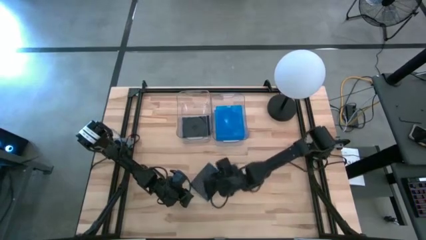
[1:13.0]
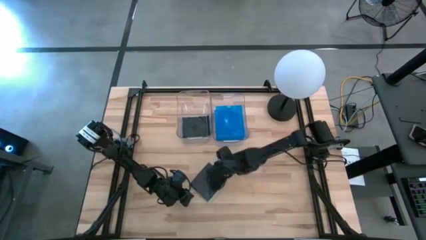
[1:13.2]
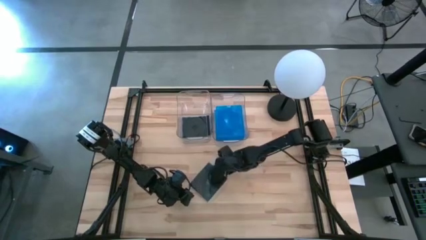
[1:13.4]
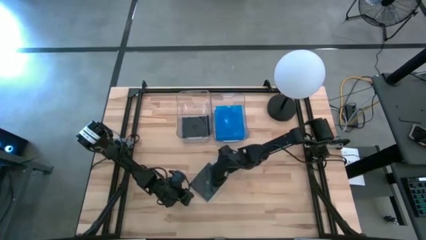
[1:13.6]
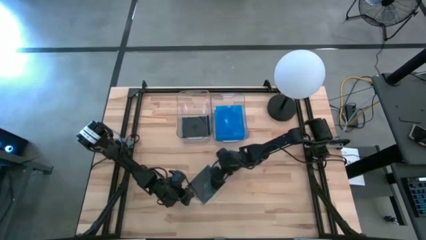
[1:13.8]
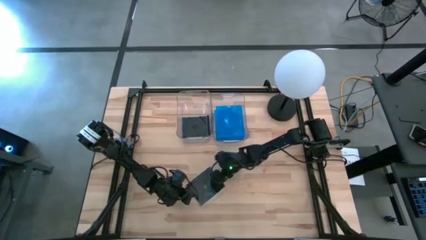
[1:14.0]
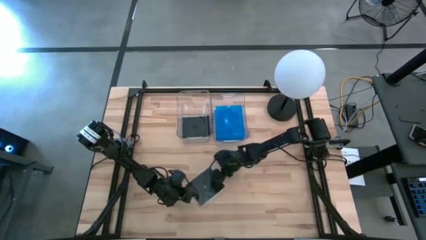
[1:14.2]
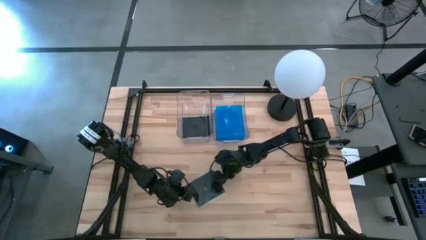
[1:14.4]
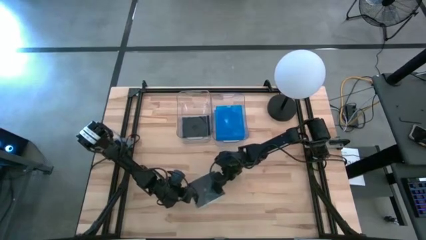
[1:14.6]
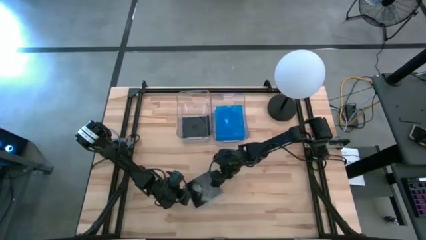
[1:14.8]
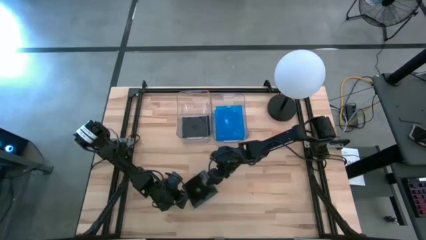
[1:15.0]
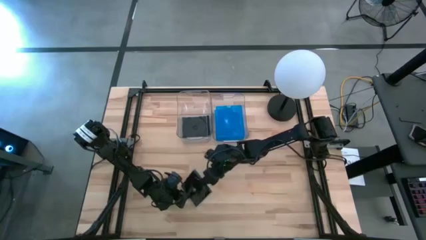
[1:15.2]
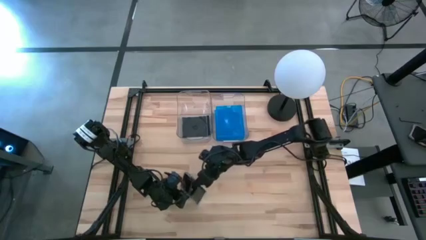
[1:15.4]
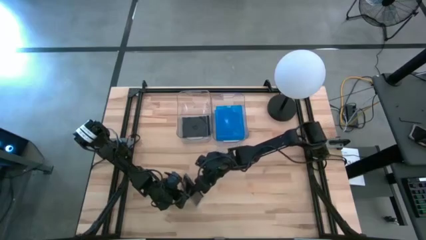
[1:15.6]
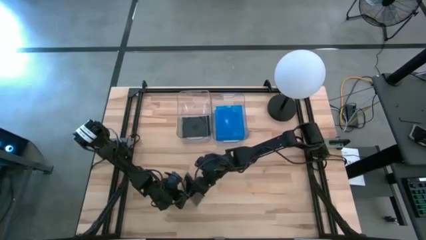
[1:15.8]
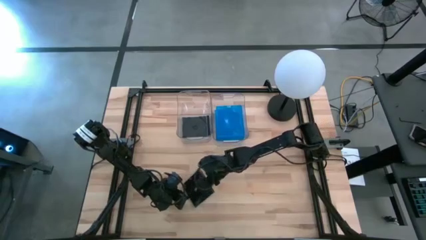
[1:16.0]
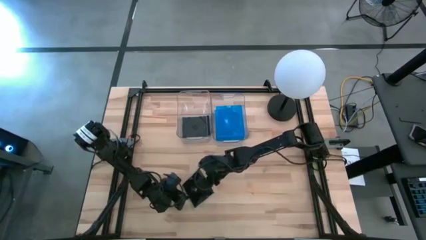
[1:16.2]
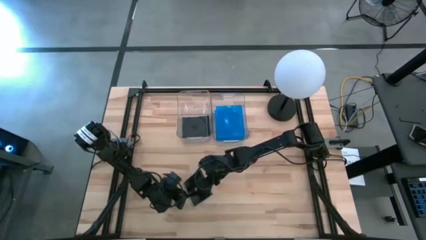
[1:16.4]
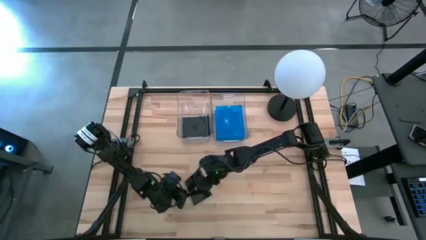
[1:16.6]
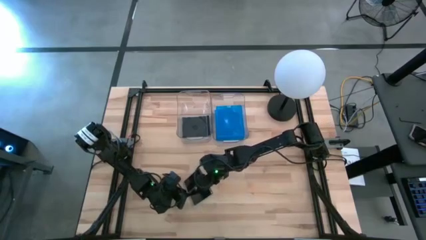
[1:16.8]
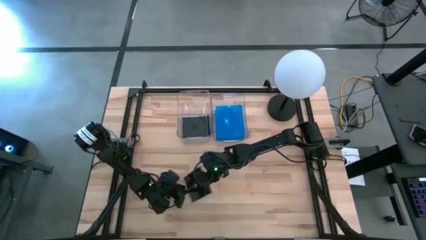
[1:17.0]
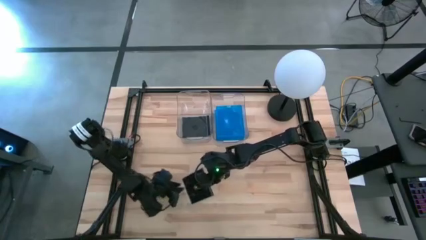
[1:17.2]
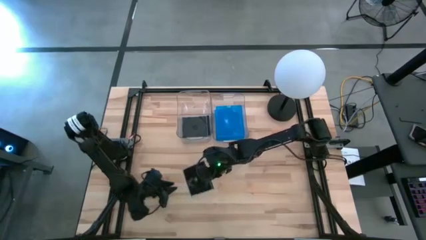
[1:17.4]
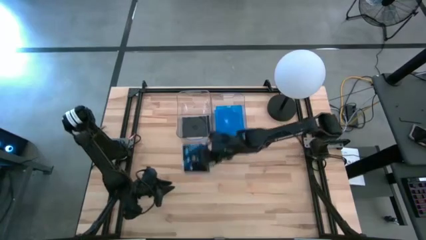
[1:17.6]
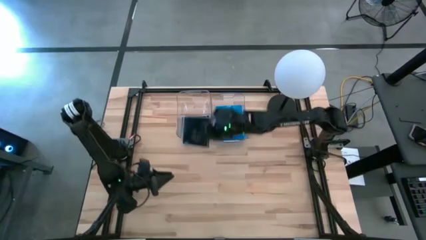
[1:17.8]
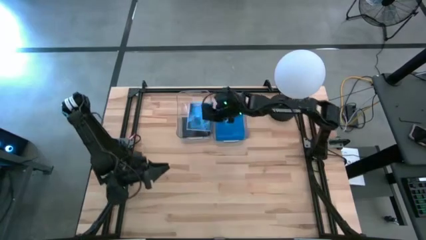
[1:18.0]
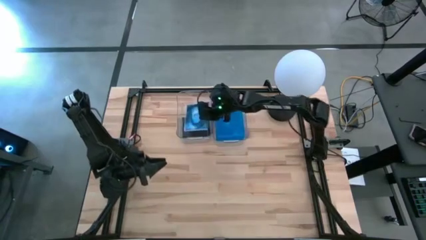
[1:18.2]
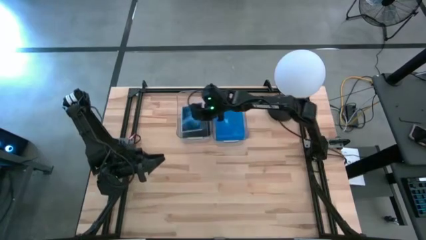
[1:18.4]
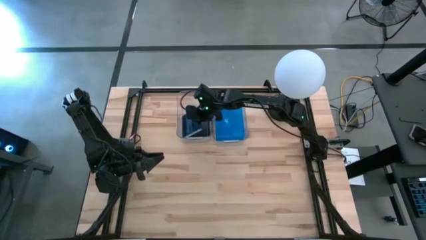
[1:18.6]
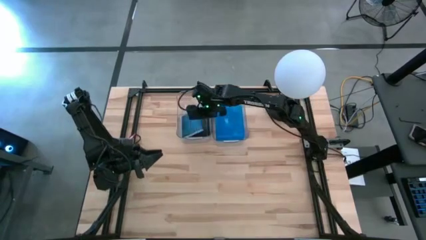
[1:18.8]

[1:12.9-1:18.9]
Task: Pick & place jewel cases by type
Put the black CD case into the left transparent bin

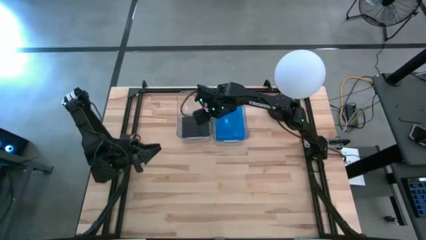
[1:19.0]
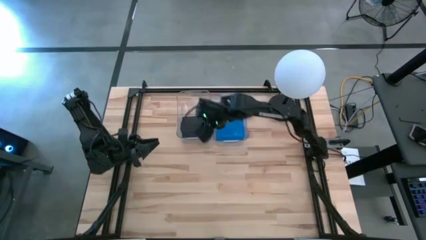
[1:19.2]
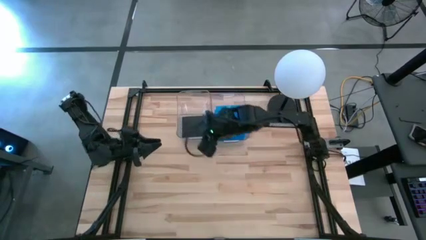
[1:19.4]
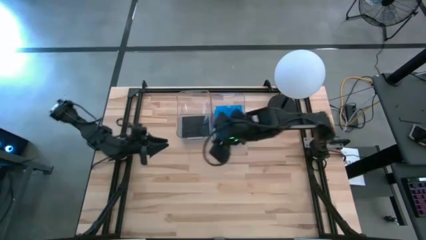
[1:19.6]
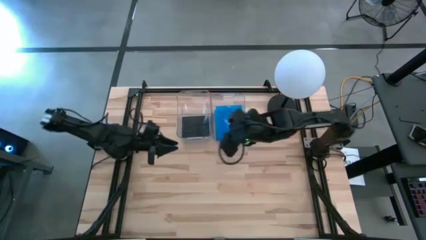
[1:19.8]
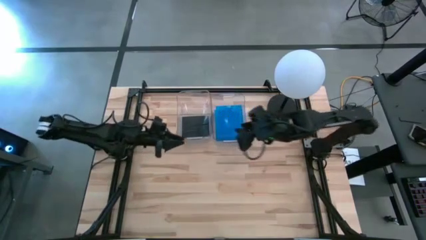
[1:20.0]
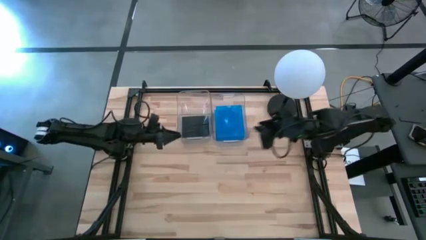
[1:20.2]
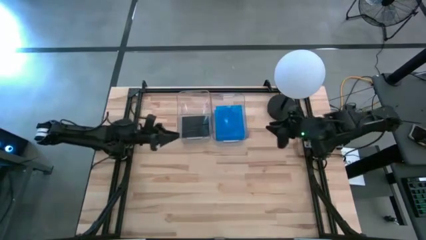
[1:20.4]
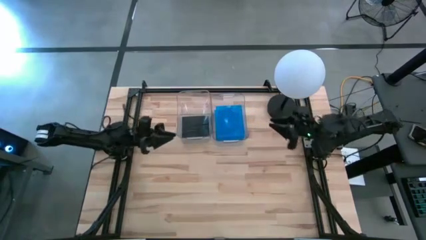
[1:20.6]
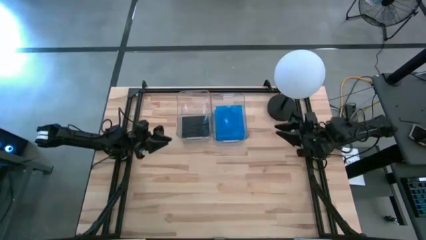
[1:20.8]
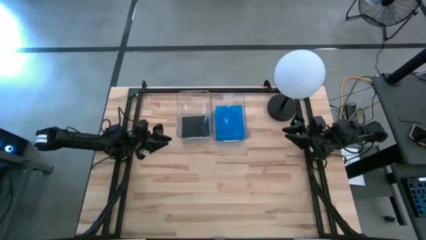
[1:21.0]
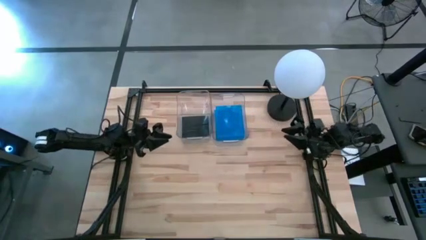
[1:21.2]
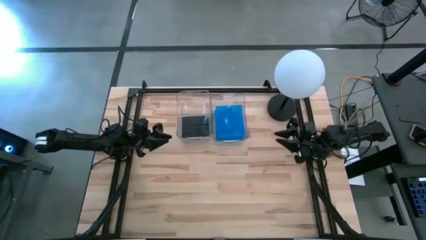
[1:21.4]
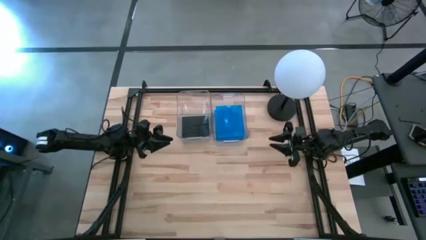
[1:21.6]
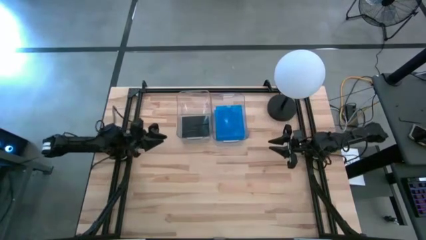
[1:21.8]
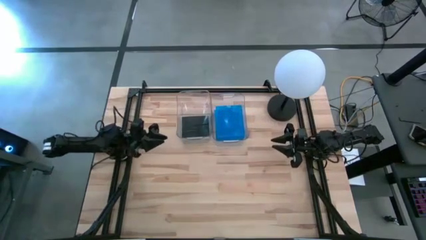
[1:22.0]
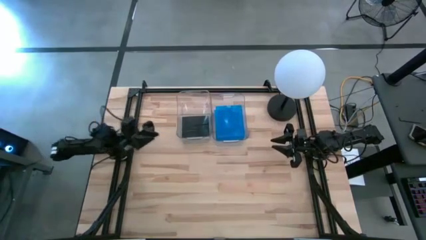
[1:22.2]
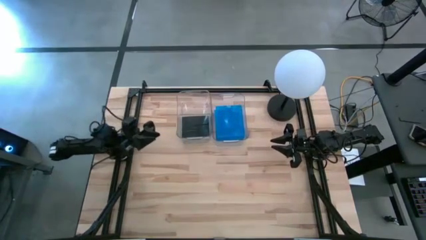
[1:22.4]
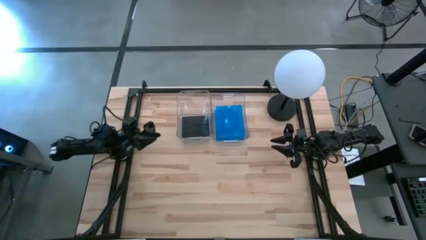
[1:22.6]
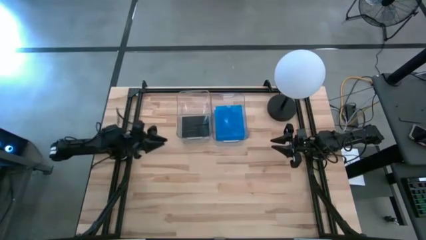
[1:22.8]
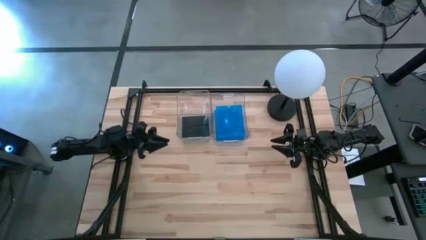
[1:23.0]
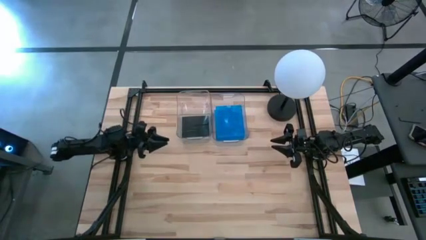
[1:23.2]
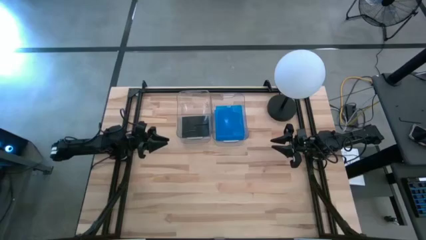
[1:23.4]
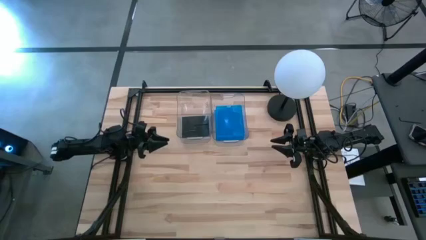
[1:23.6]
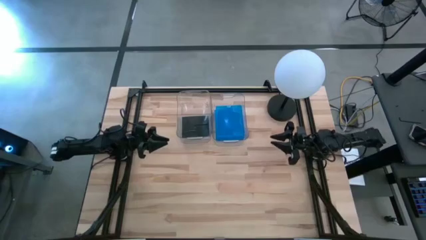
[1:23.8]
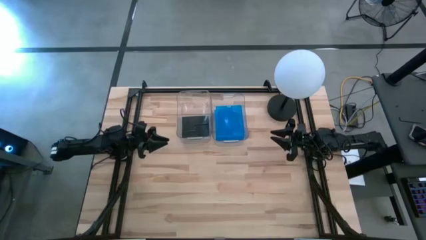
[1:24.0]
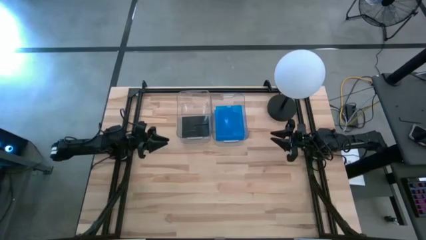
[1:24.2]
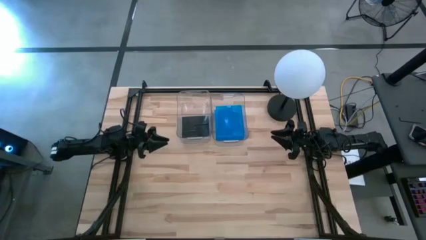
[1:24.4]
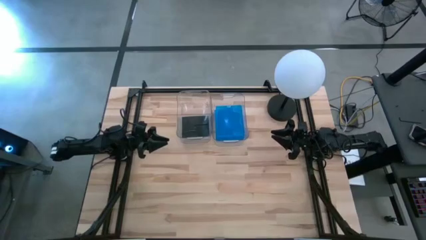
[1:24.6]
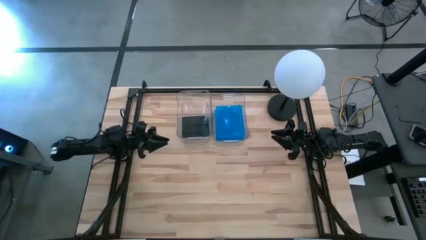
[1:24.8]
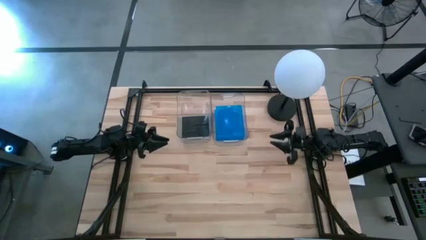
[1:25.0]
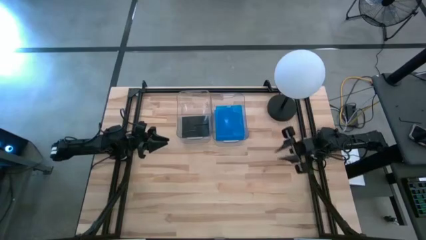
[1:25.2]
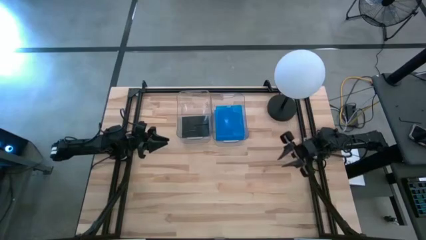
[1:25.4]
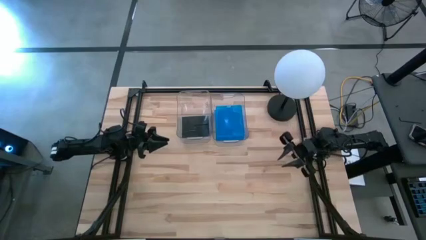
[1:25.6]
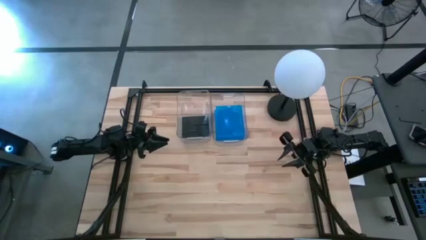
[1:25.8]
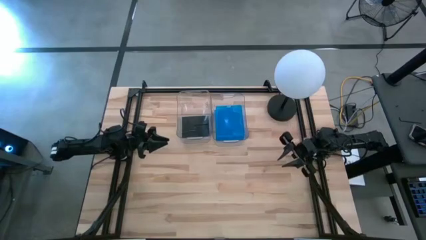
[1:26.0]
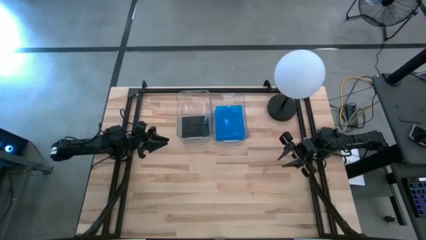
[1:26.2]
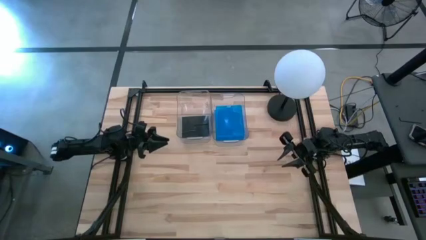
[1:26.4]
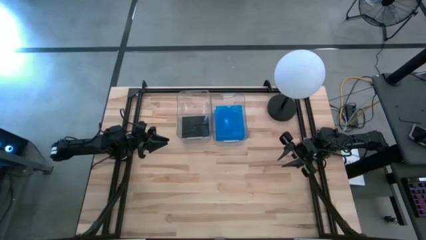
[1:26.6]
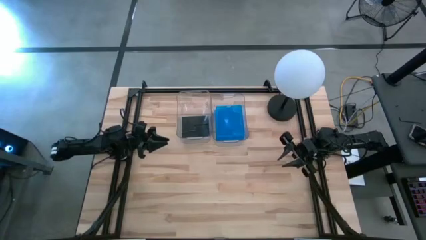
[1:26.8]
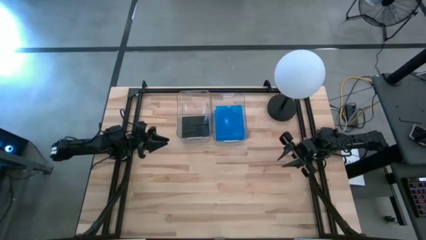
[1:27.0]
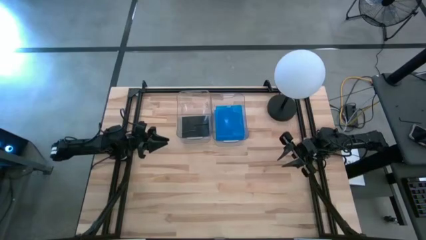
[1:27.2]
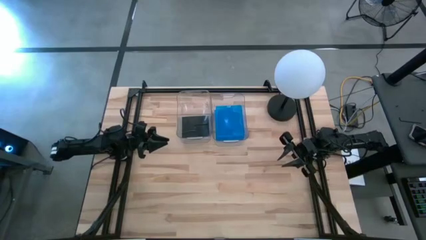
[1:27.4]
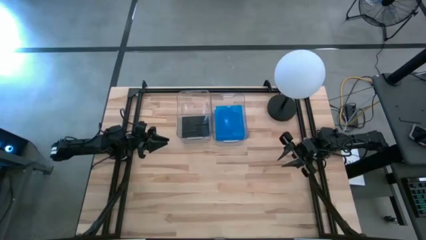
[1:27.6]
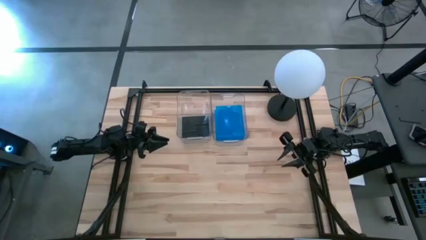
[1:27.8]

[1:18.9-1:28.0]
Return to Home Position
